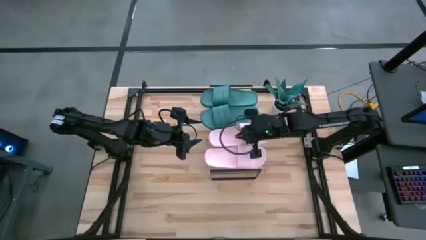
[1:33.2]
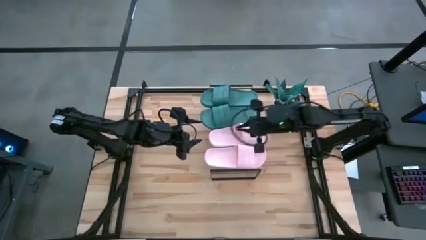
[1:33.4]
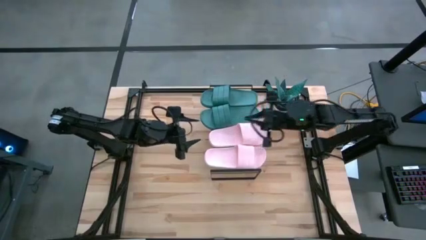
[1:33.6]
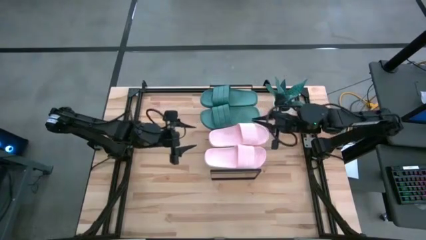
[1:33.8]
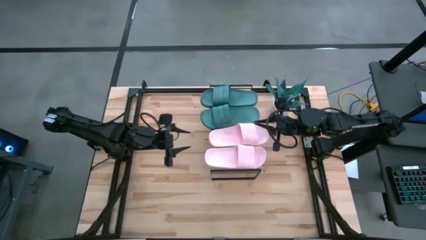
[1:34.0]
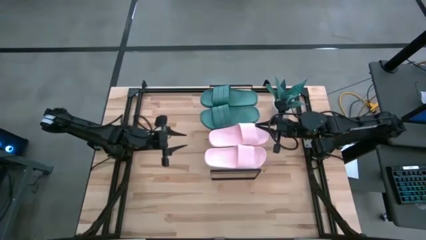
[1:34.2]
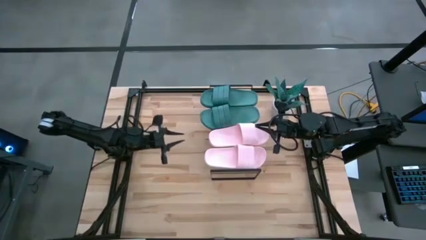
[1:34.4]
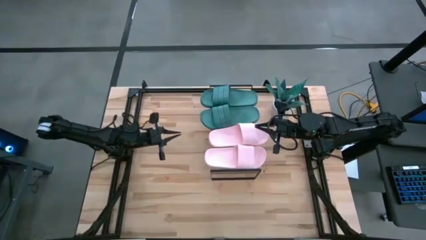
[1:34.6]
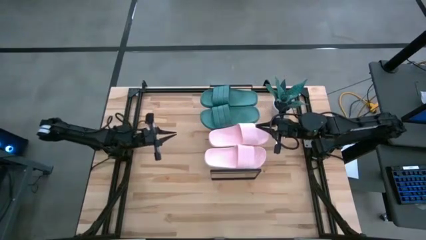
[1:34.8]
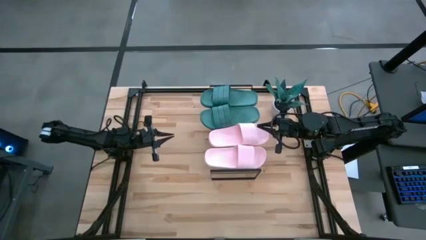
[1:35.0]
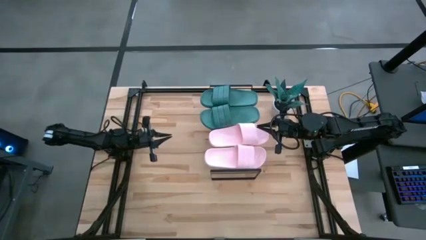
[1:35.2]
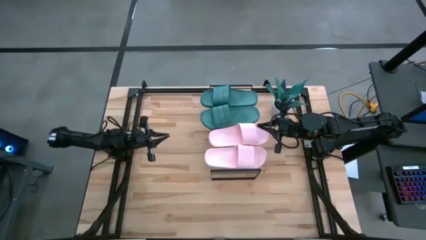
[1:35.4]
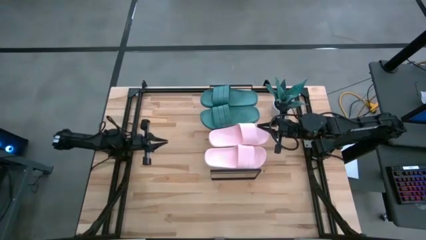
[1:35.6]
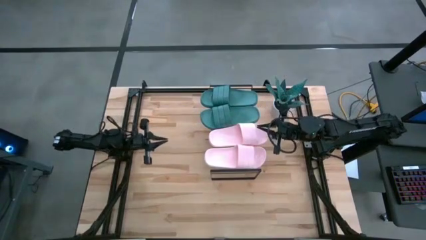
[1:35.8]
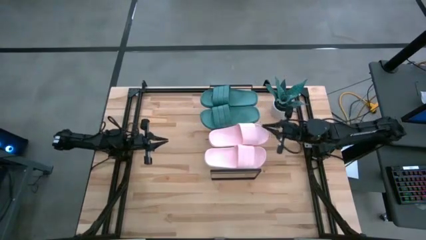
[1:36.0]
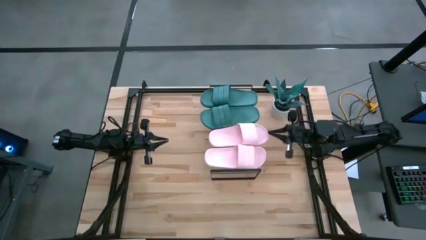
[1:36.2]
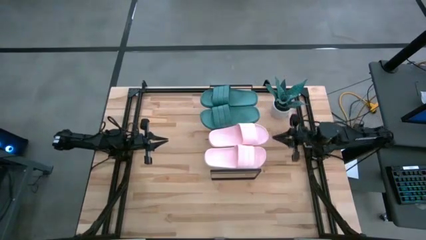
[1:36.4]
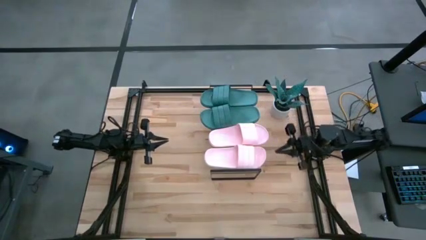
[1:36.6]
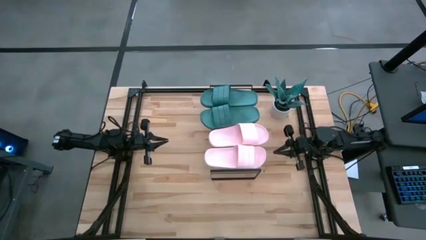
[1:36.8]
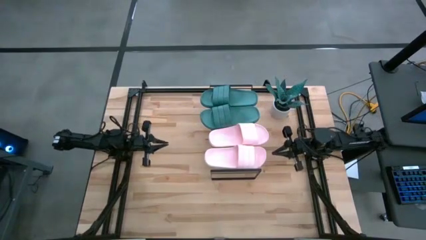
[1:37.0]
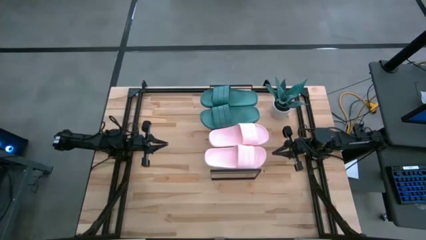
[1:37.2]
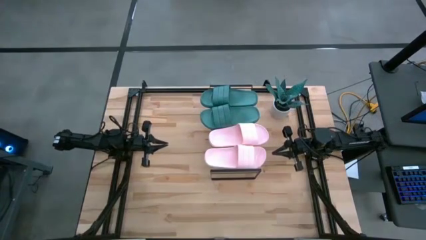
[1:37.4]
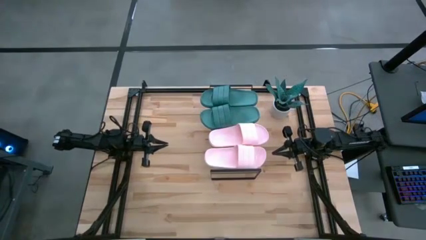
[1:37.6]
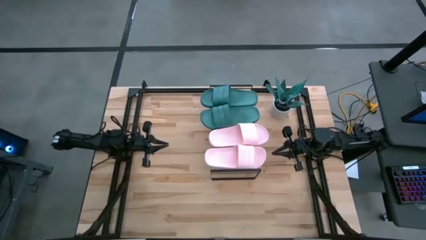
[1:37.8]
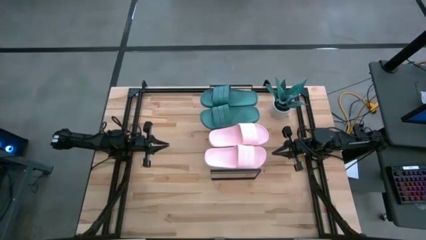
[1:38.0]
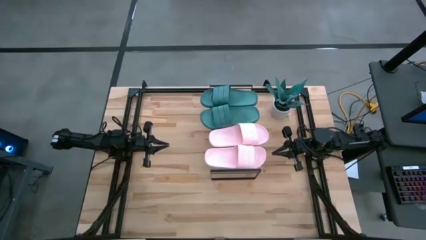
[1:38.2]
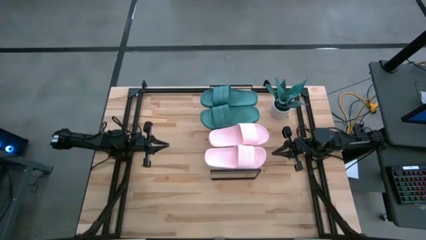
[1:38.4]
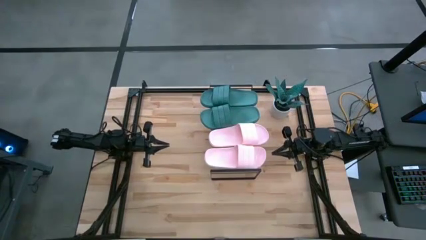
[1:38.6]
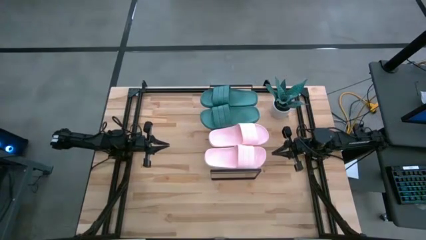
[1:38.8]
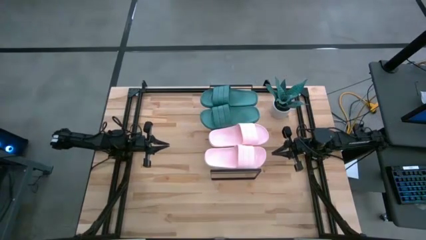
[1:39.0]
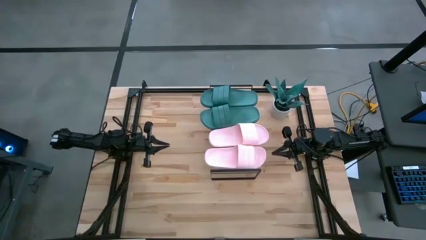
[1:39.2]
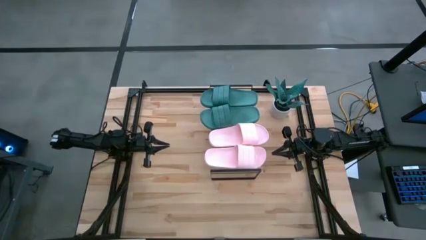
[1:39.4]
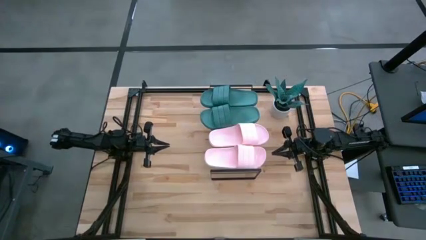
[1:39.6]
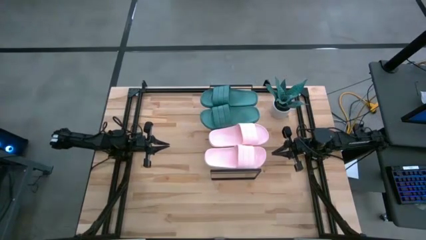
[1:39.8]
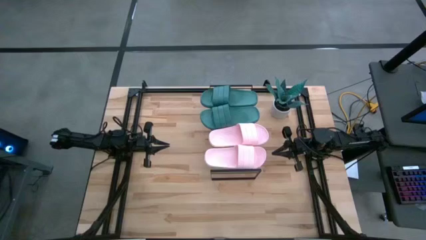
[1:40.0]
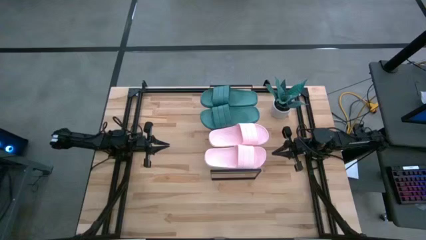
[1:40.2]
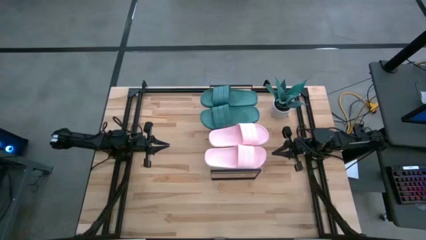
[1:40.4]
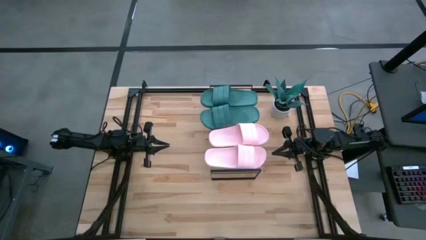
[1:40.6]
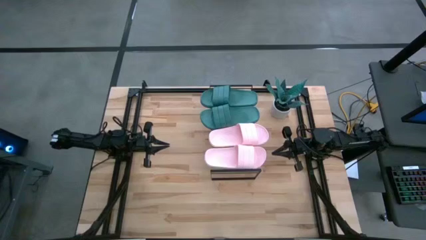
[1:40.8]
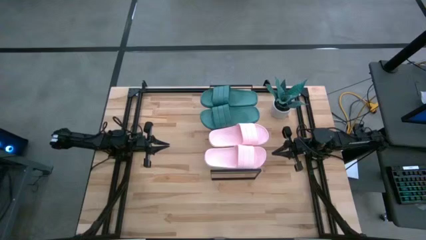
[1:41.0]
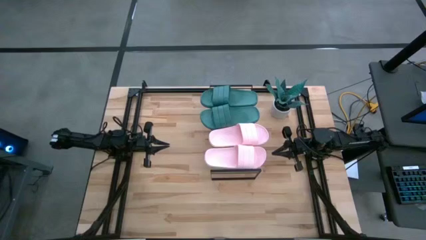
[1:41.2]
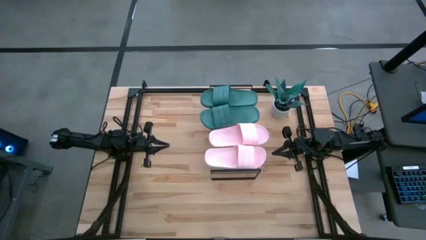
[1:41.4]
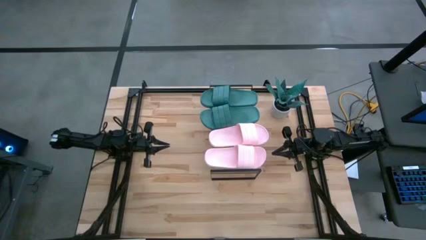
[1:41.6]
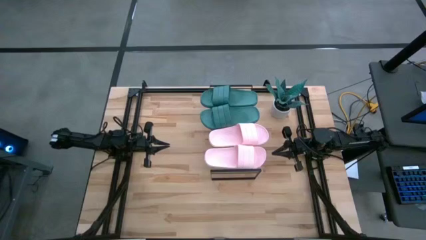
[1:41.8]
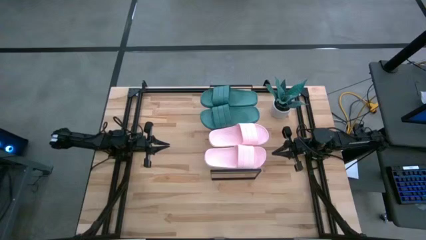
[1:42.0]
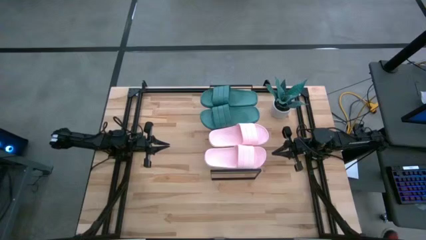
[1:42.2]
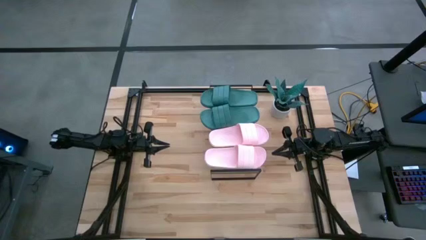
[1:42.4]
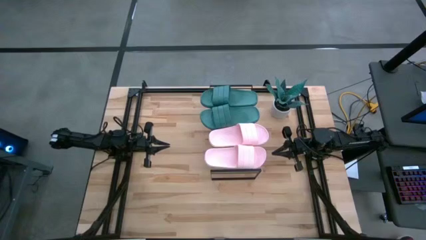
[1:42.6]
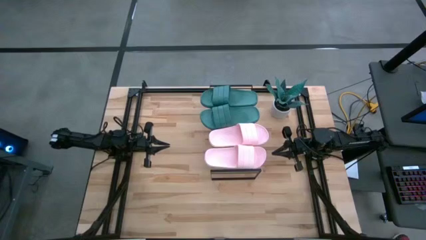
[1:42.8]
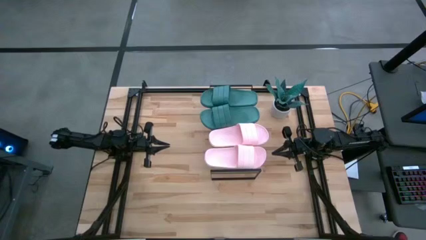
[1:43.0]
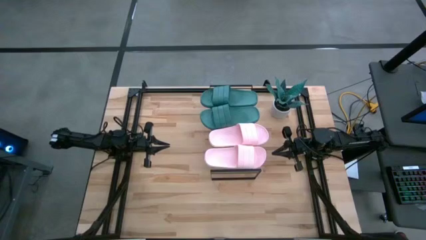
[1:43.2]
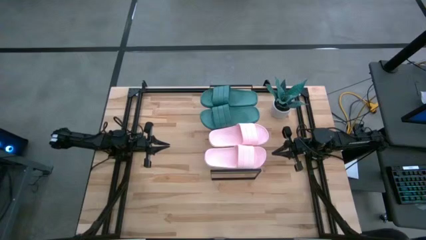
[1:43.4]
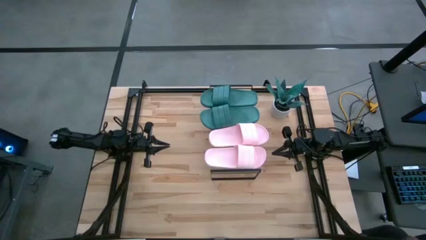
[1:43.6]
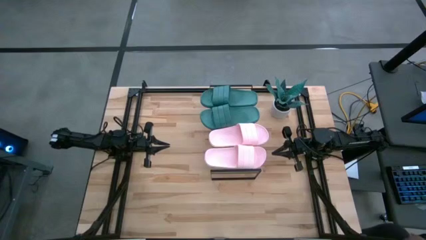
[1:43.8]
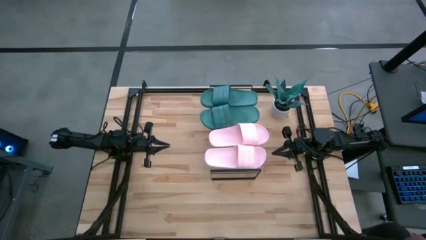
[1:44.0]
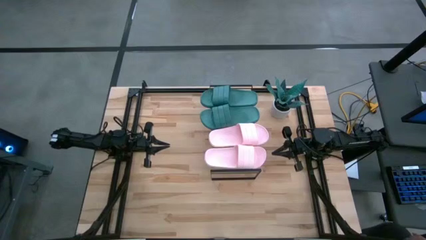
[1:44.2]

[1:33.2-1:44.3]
Task: Pick and place slides into the shelf
Return to Home Position

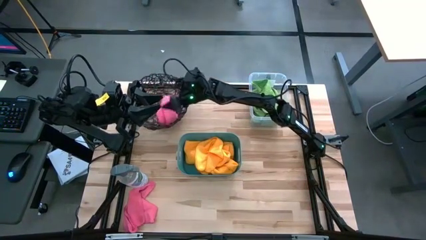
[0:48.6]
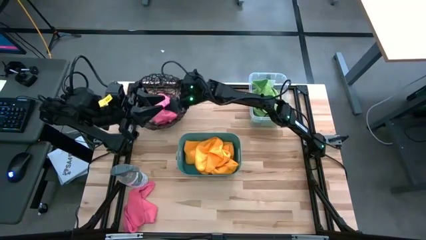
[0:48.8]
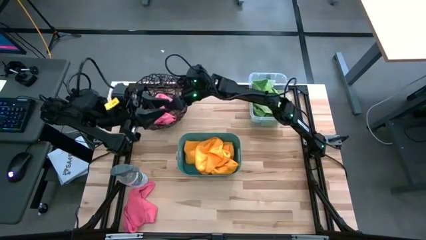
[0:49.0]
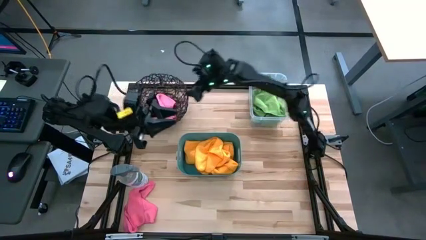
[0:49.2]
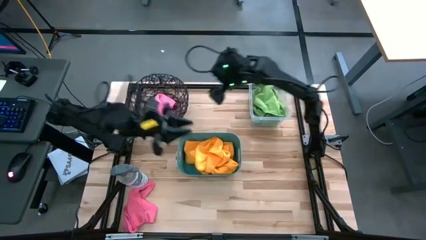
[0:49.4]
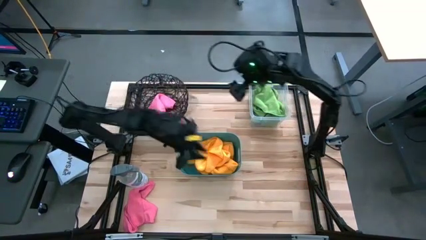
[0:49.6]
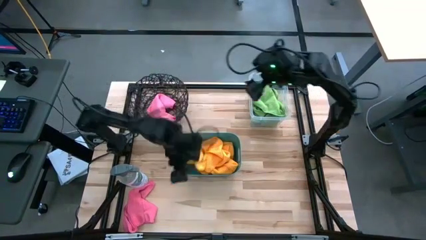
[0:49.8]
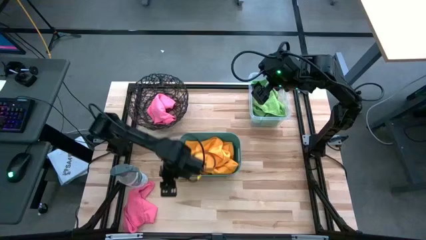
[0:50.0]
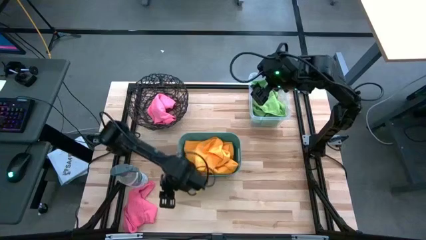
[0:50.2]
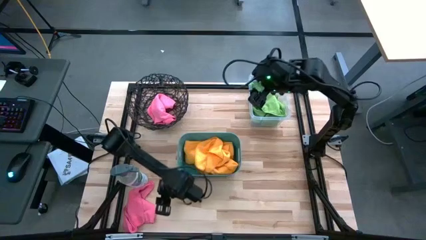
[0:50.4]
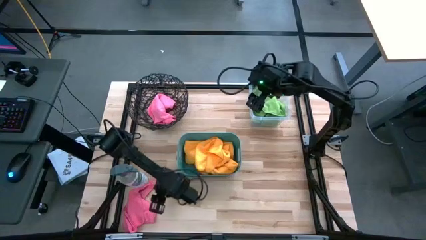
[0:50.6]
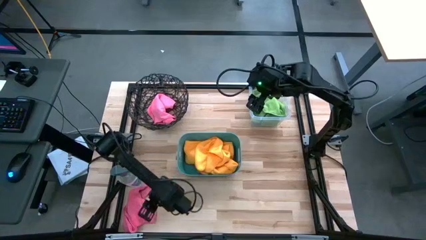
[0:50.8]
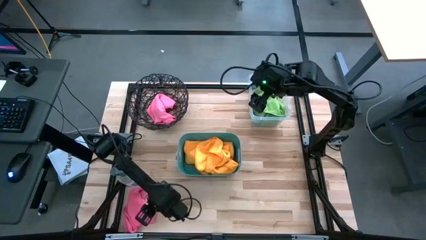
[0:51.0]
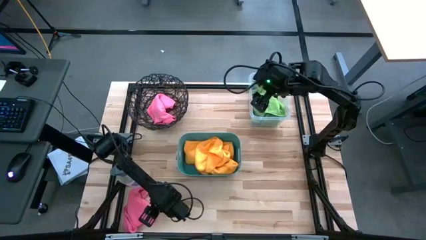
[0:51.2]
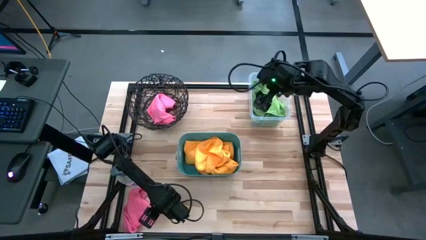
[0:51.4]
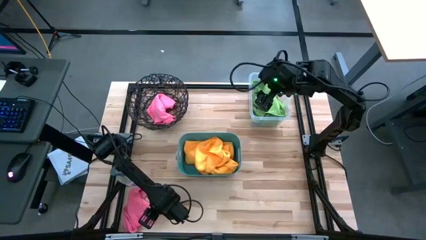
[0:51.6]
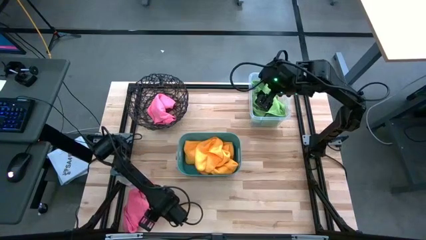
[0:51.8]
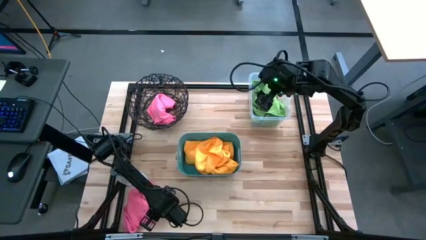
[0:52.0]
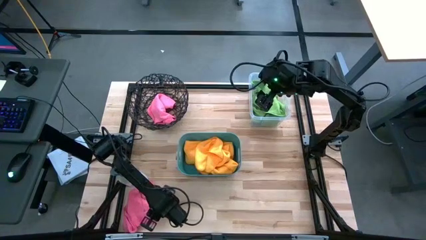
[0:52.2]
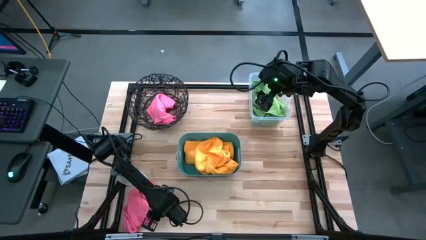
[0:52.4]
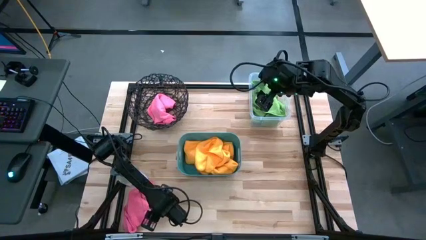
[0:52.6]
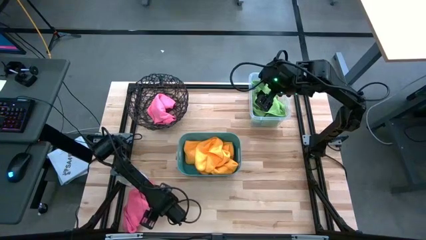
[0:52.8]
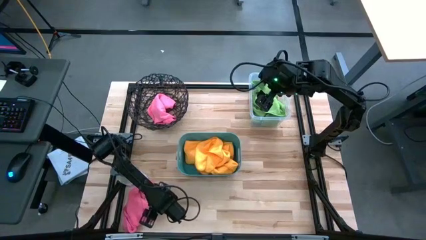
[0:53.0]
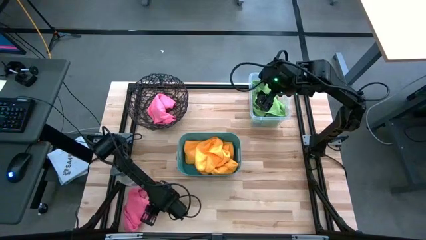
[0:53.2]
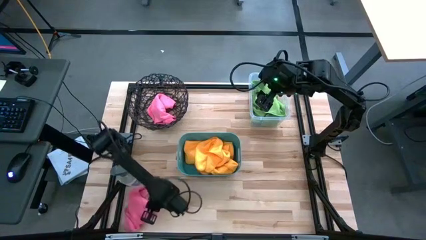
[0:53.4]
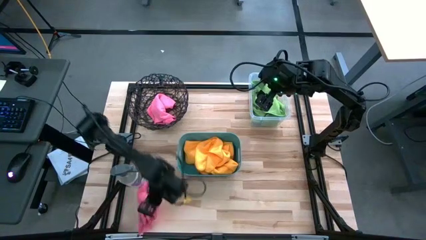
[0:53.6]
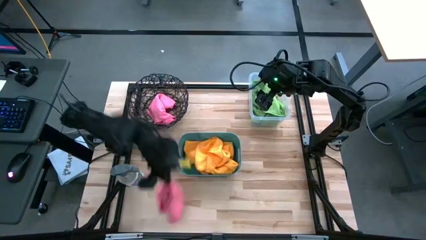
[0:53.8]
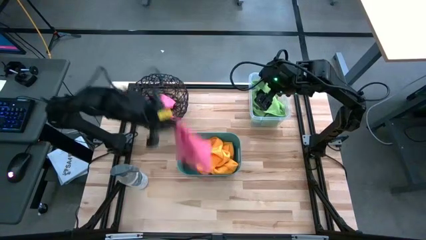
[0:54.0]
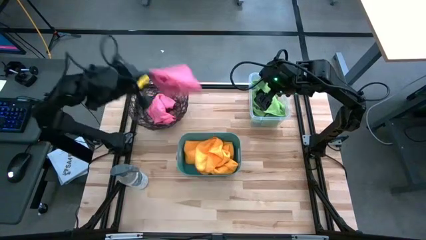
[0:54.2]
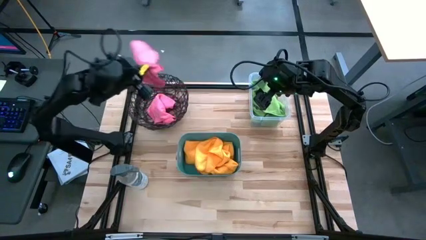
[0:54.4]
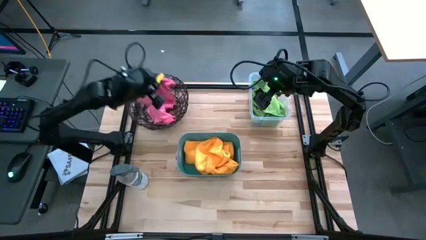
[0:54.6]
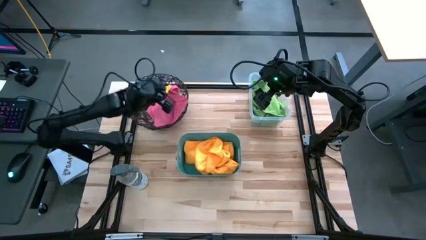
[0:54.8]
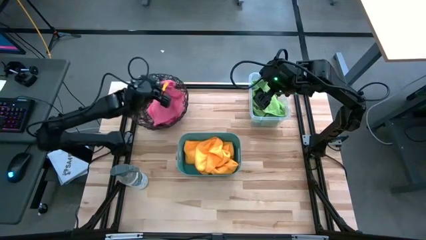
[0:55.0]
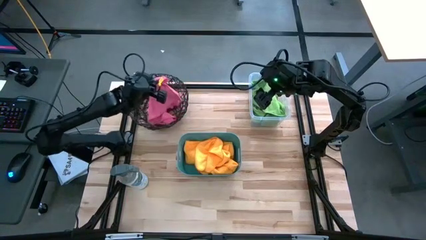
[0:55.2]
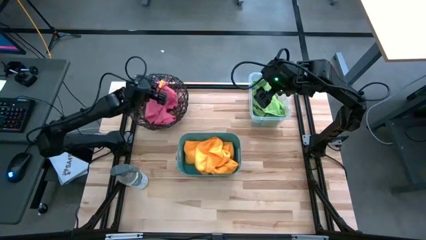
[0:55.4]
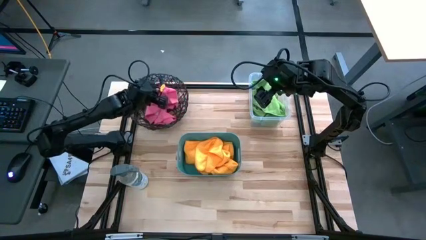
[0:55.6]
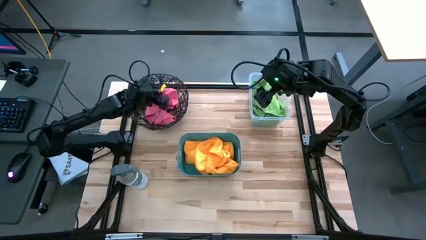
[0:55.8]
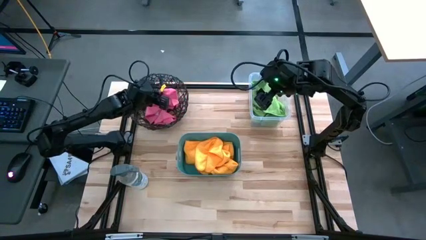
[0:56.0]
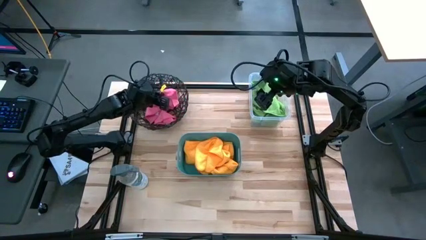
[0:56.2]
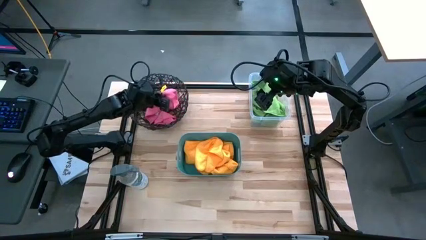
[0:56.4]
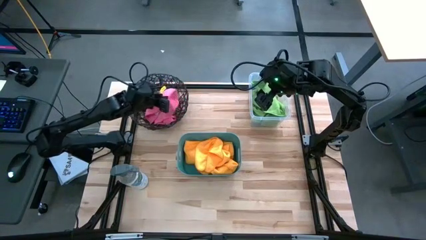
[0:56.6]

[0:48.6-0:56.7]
Task: Sort microfiber towel by color & place in baskets
Put the pink microfiber cloth into the wire basket
